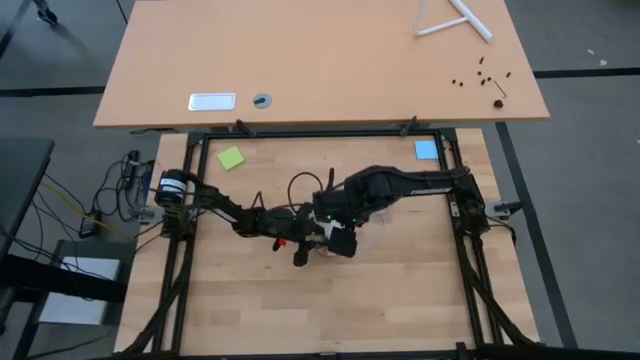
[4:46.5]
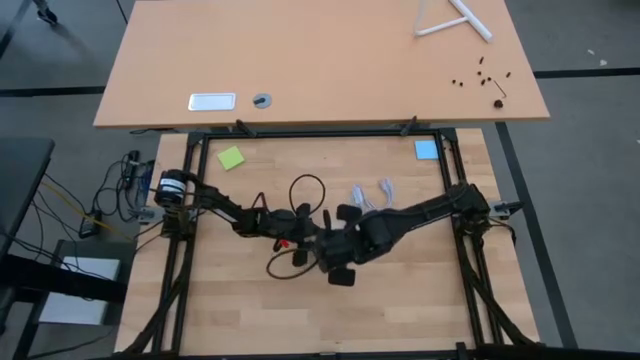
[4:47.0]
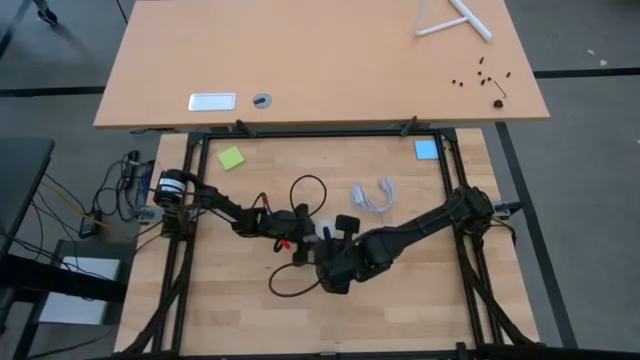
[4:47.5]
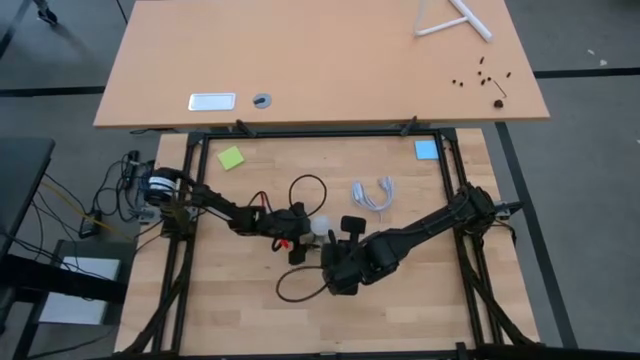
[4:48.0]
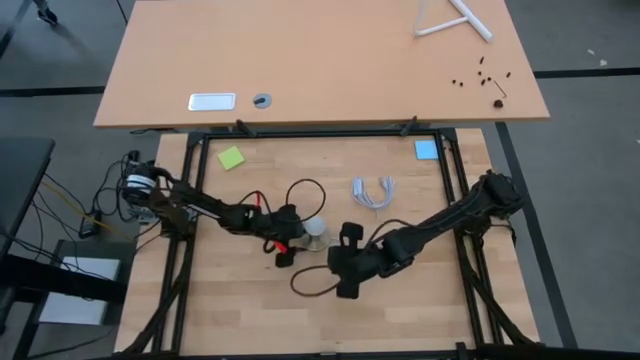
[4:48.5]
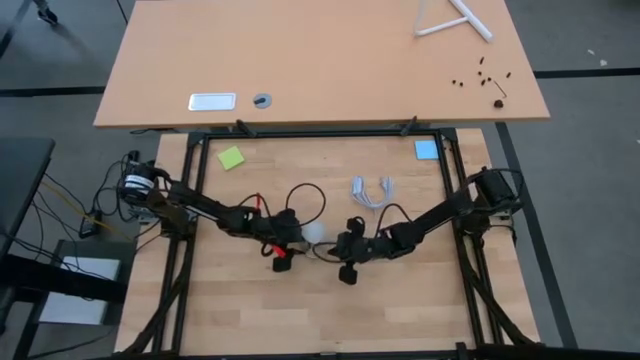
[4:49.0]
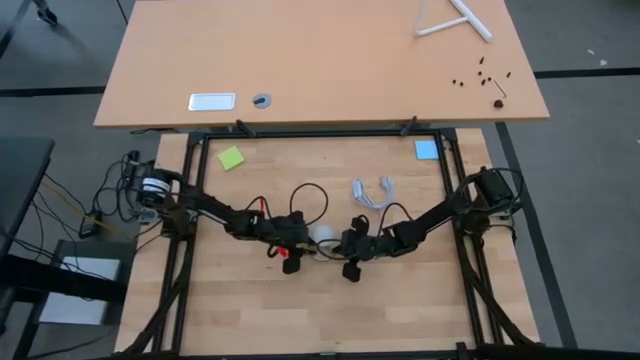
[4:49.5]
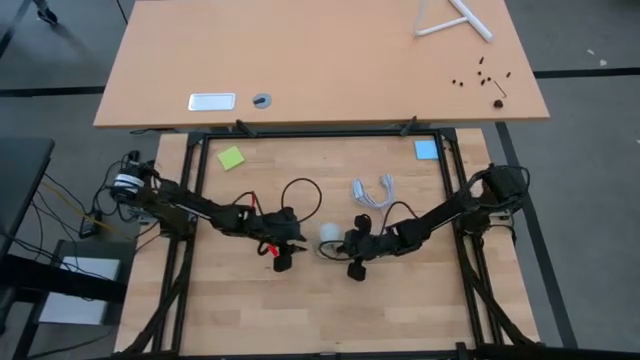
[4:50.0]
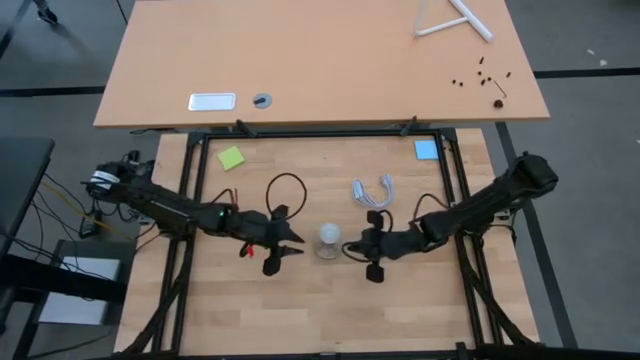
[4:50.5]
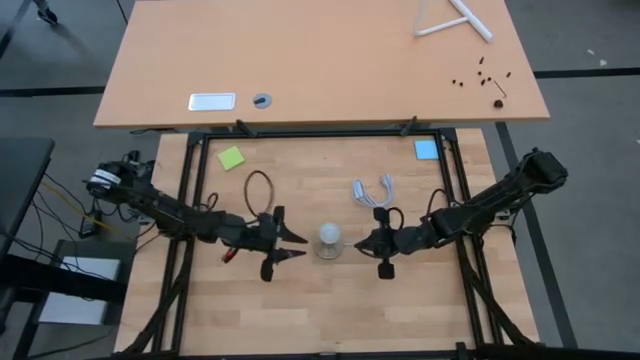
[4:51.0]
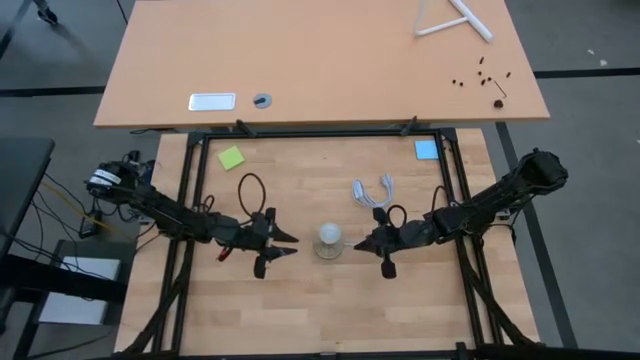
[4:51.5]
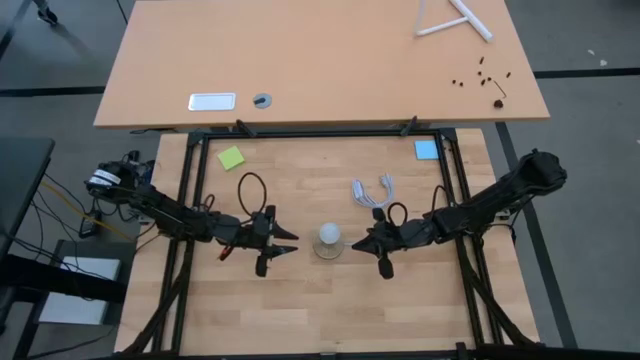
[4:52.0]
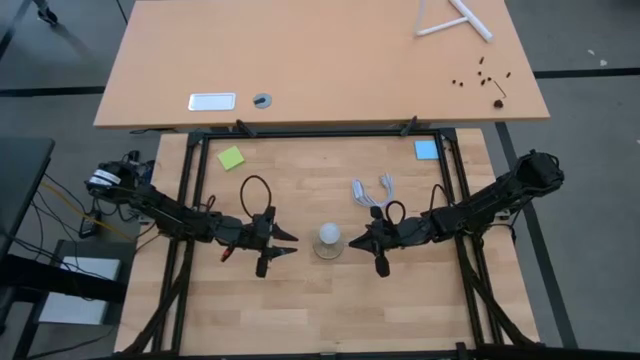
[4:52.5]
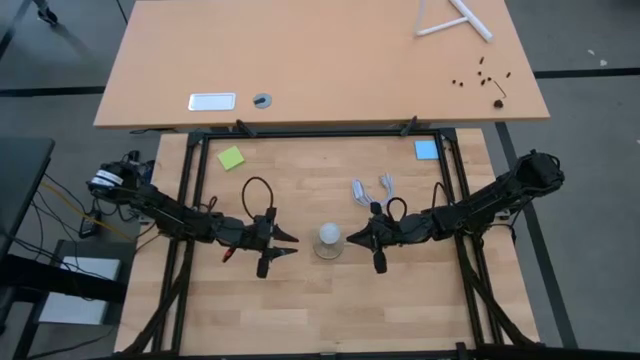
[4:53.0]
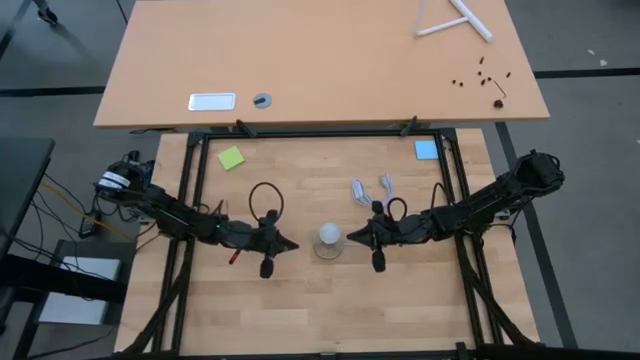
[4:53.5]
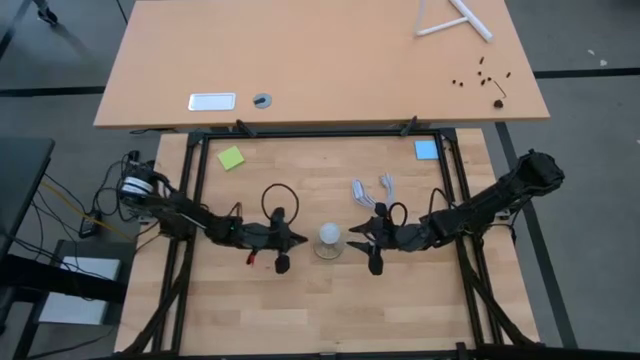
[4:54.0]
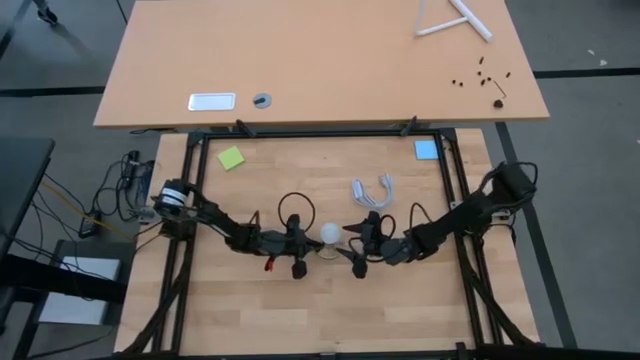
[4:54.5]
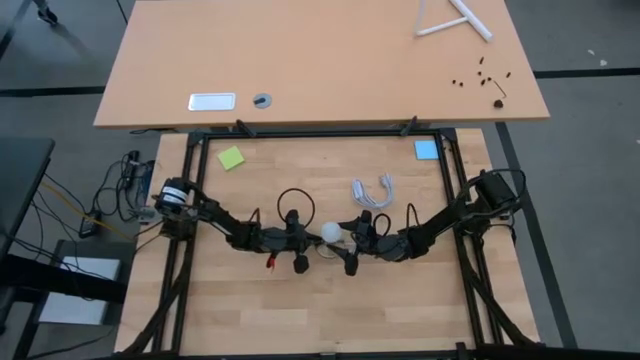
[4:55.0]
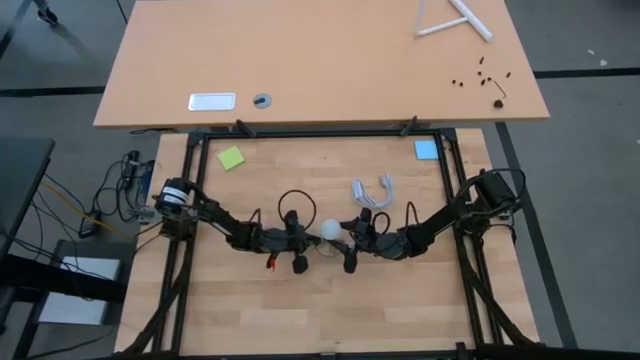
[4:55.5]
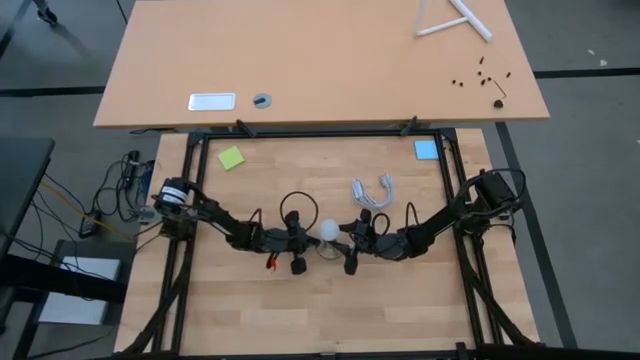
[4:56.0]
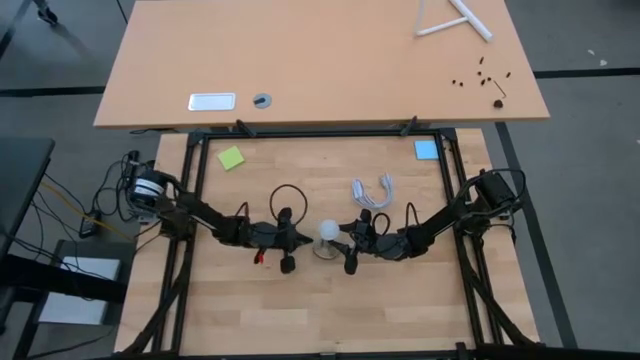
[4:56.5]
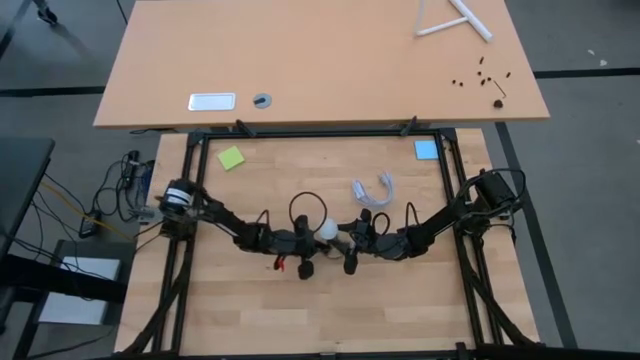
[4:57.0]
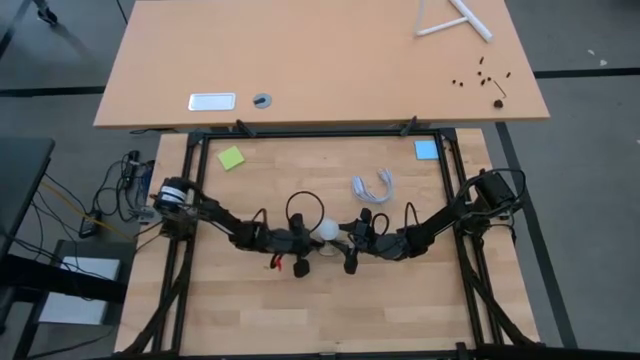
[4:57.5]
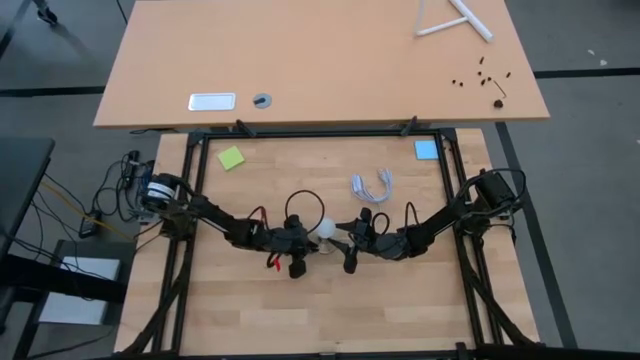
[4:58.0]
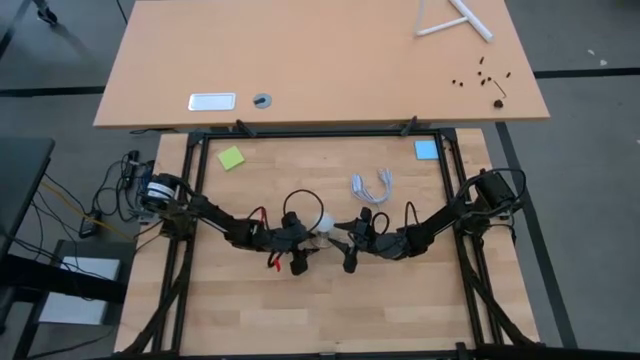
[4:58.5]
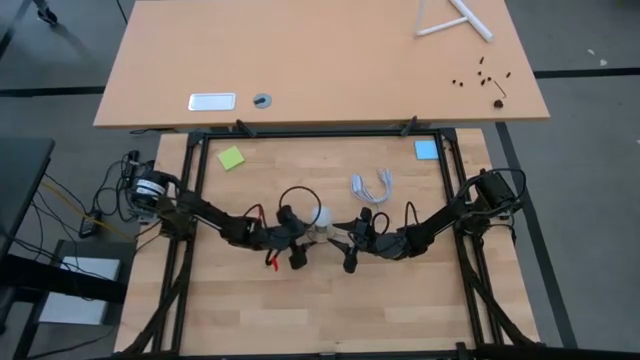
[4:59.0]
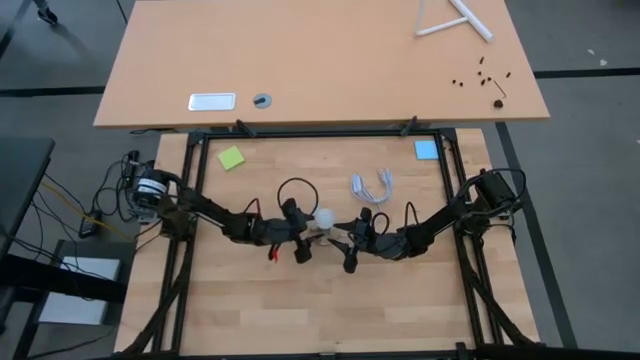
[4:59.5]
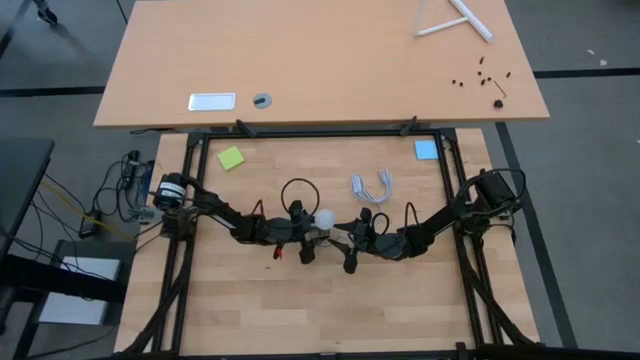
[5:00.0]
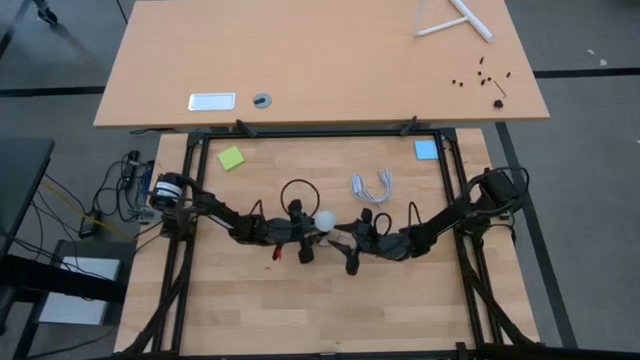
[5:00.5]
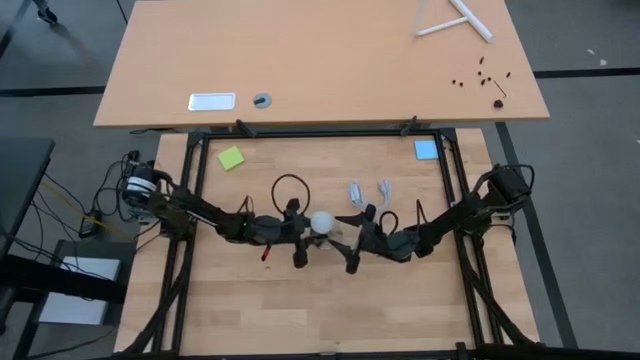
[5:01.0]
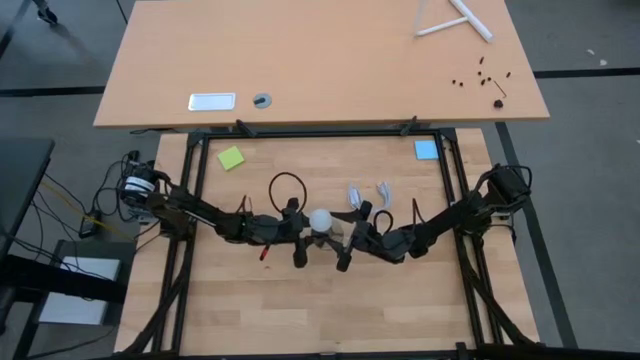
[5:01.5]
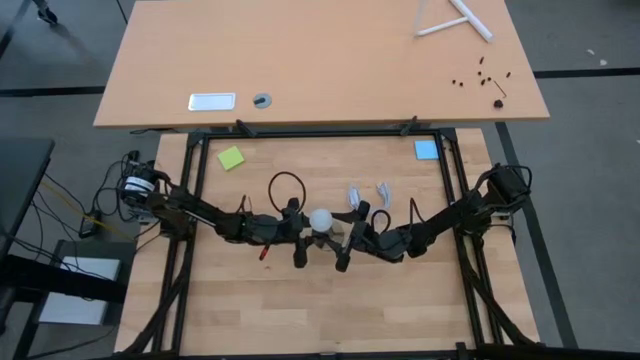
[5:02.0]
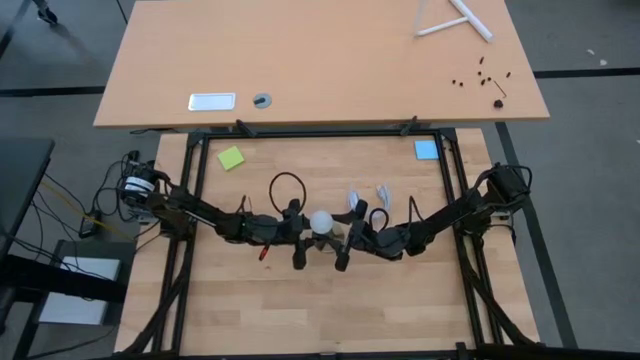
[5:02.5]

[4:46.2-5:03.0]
Task: Screw lightbulb
Remove the lightbulb from the lamp

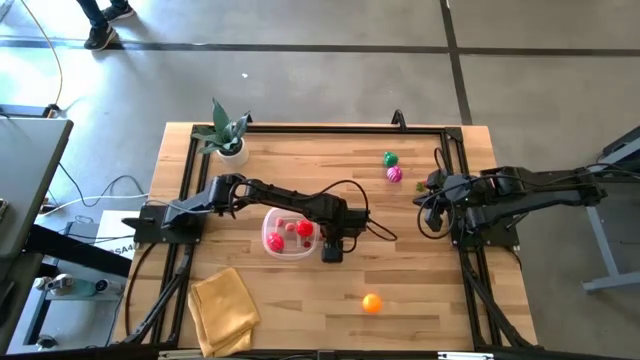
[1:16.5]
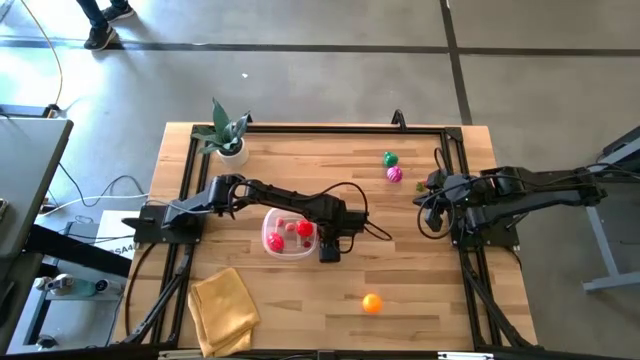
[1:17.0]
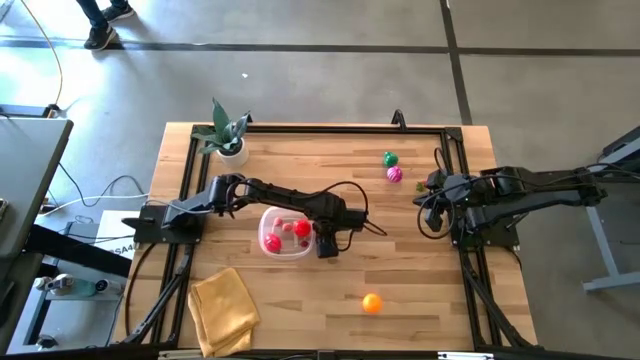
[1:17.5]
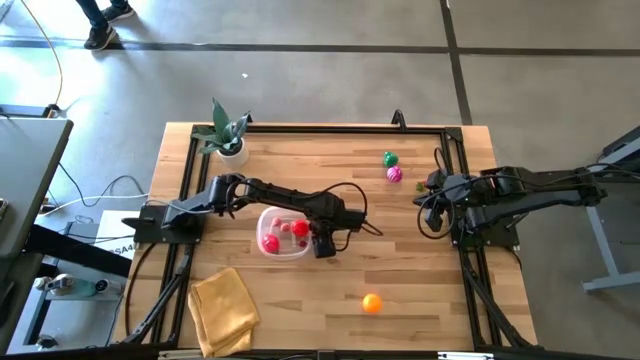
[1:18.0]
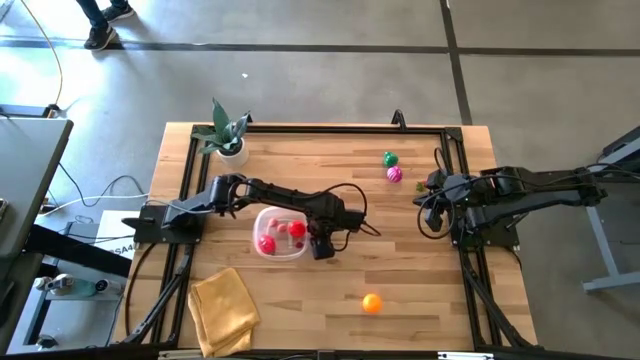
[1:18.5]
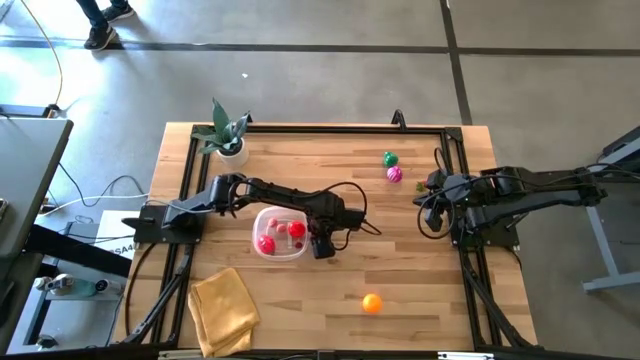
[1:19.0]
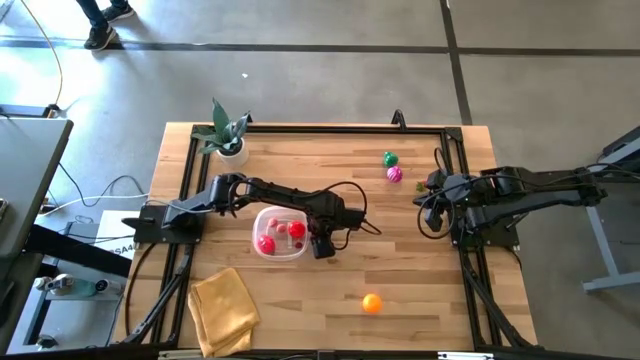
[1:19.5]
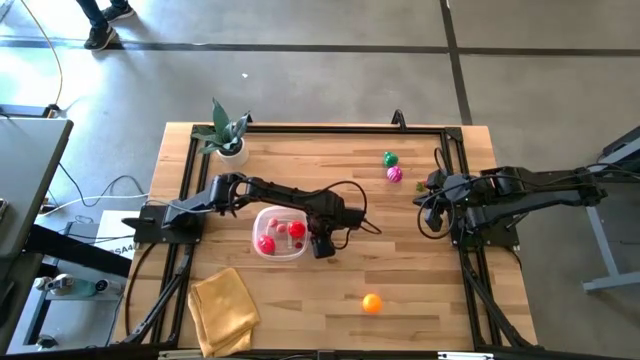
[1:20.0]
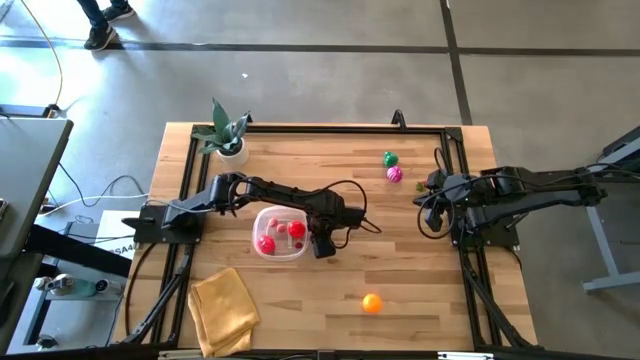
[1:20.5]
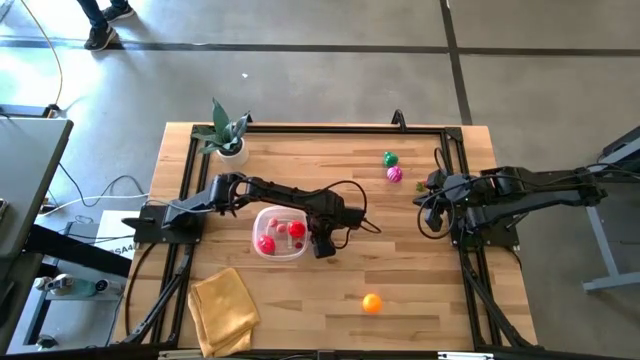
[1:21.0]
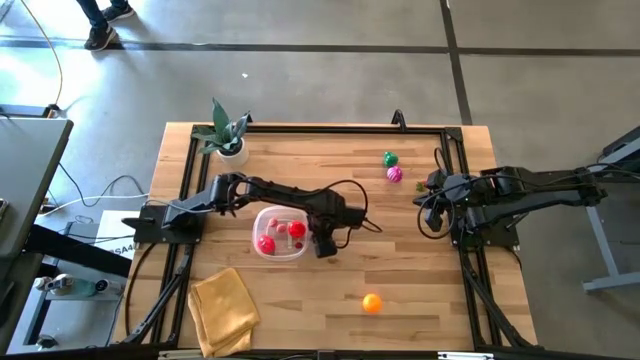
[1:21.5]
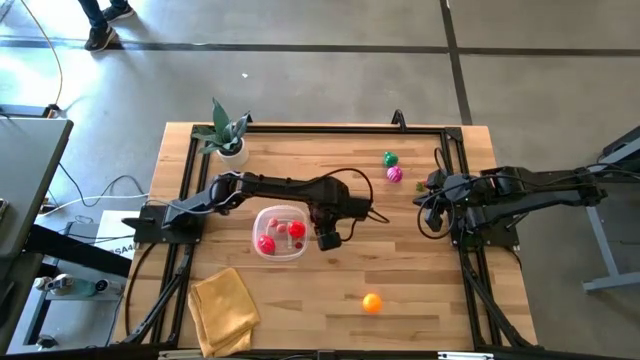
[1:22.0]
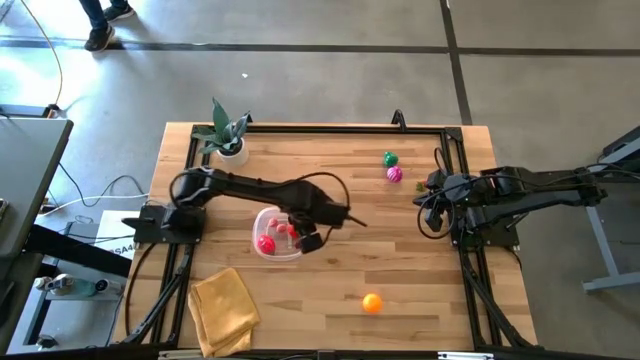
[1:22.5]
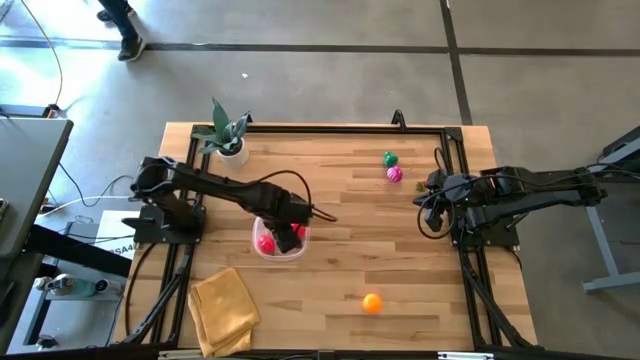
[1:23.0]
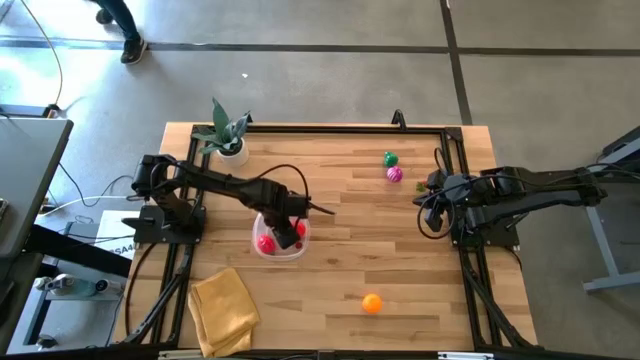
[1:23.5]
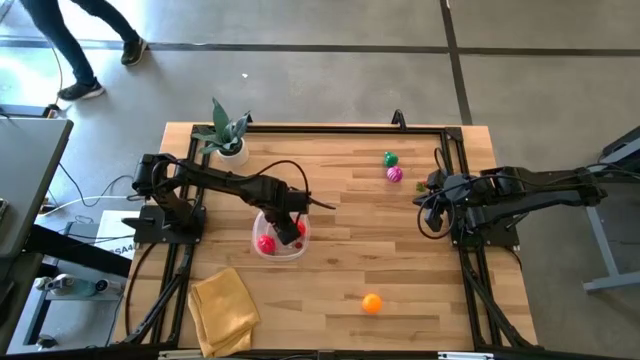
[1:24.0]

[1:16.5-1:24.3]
Task: Pick and placing Produce into tupperware
Put the red cherry into the transparent container
